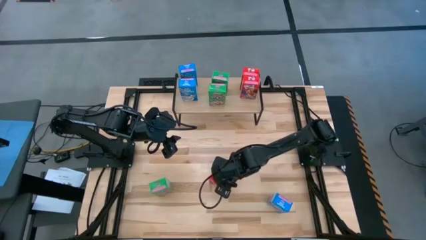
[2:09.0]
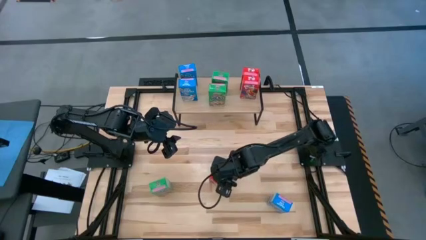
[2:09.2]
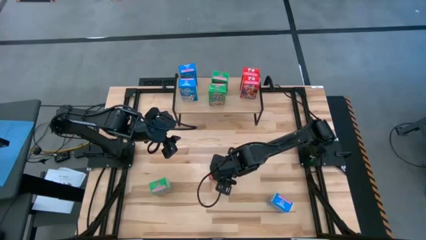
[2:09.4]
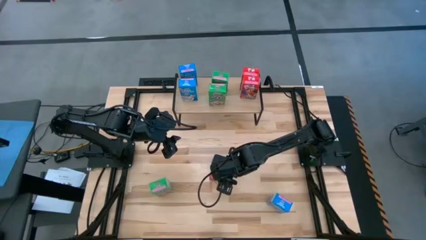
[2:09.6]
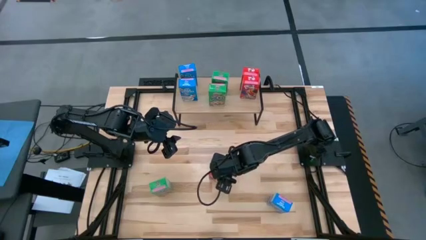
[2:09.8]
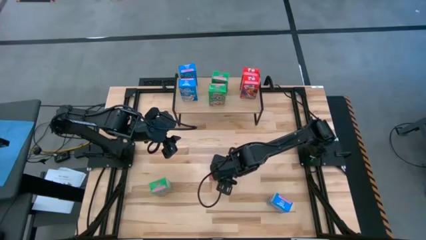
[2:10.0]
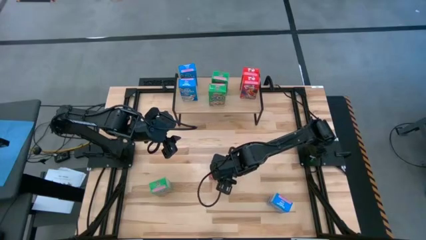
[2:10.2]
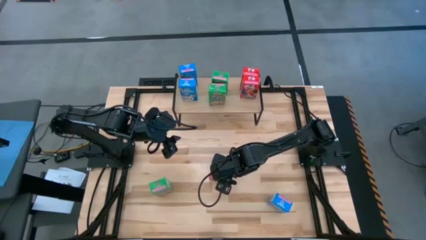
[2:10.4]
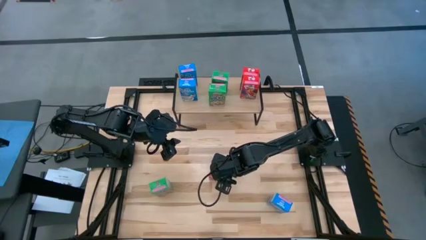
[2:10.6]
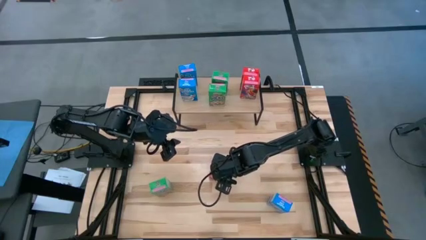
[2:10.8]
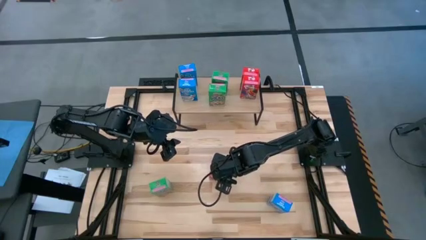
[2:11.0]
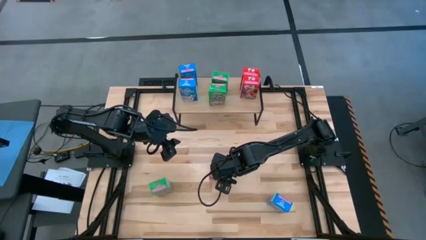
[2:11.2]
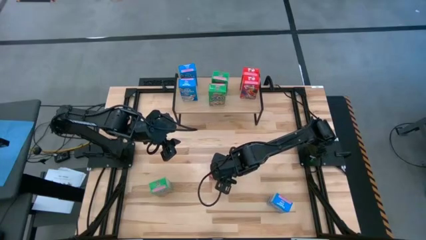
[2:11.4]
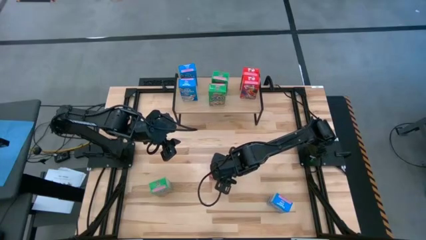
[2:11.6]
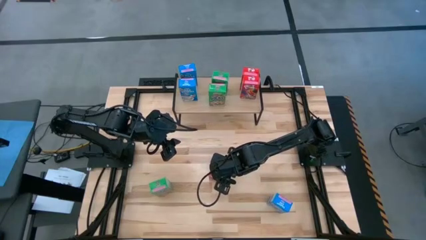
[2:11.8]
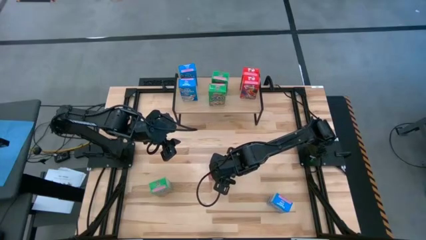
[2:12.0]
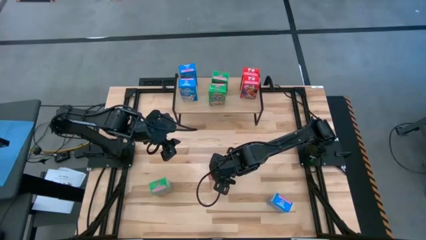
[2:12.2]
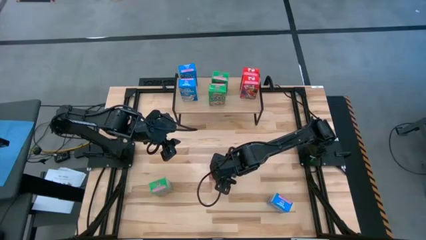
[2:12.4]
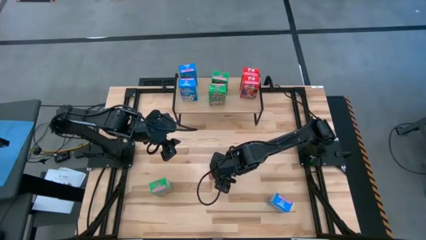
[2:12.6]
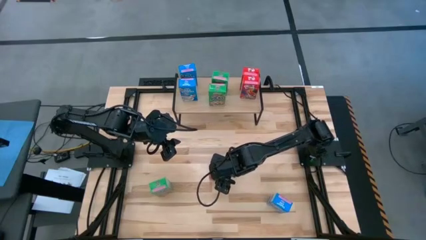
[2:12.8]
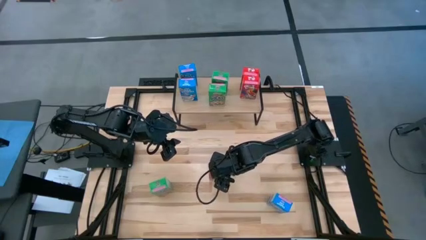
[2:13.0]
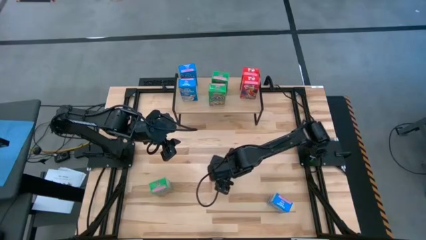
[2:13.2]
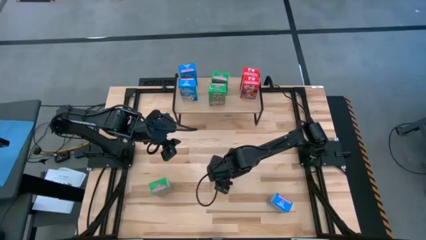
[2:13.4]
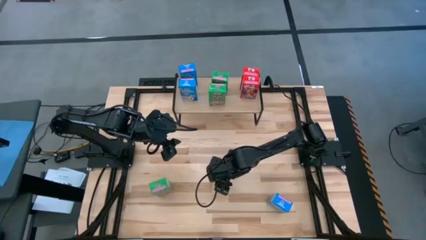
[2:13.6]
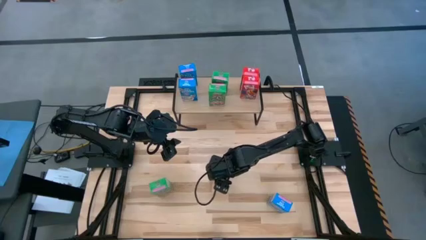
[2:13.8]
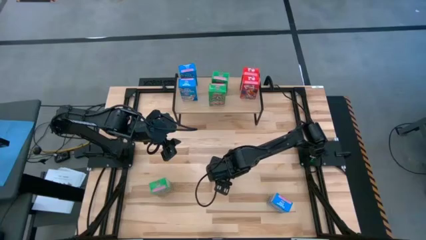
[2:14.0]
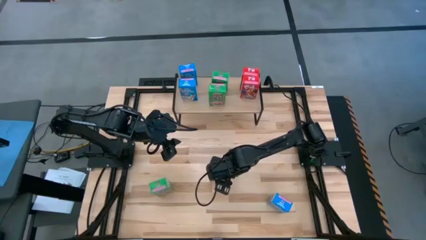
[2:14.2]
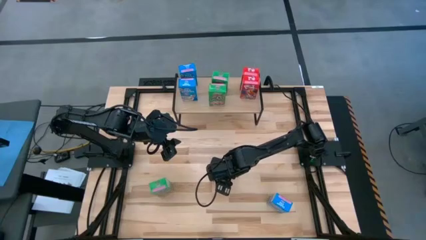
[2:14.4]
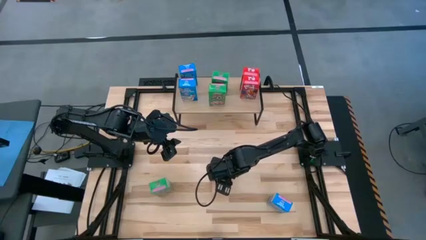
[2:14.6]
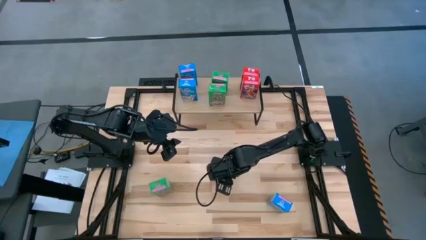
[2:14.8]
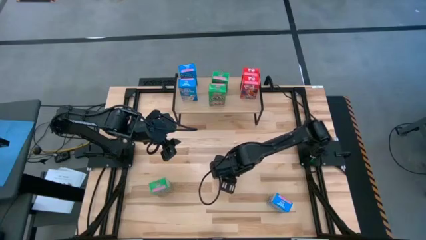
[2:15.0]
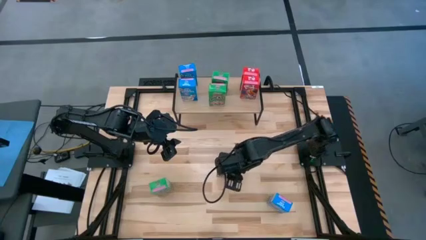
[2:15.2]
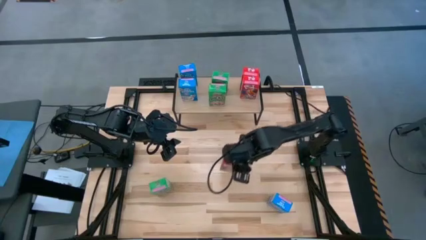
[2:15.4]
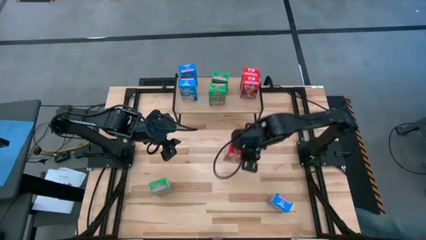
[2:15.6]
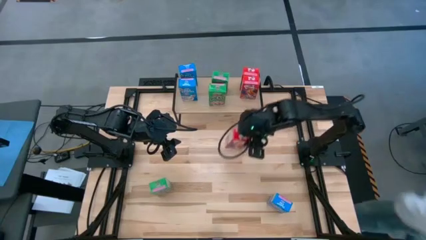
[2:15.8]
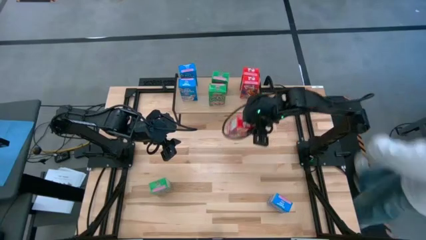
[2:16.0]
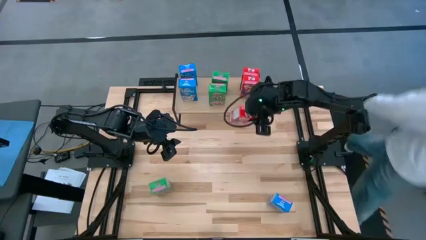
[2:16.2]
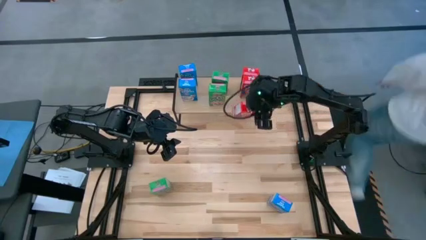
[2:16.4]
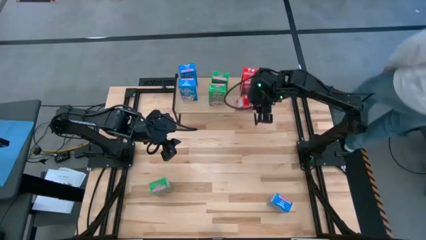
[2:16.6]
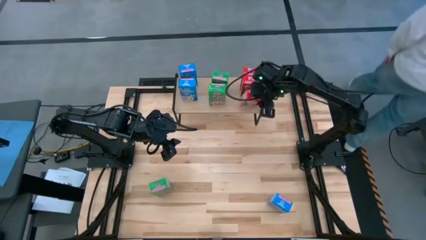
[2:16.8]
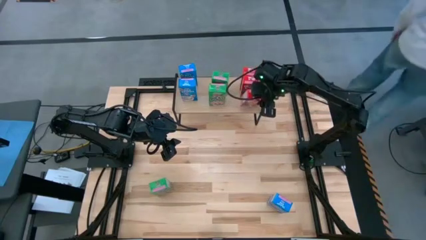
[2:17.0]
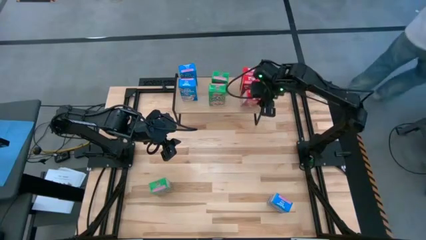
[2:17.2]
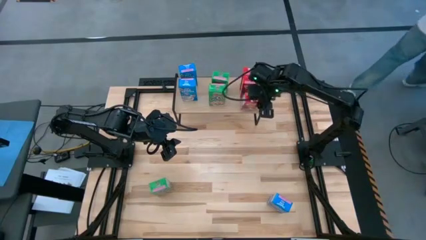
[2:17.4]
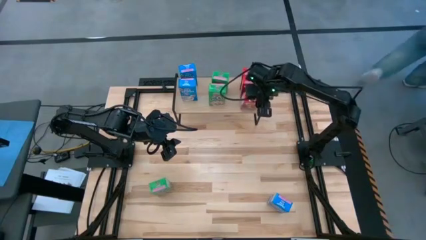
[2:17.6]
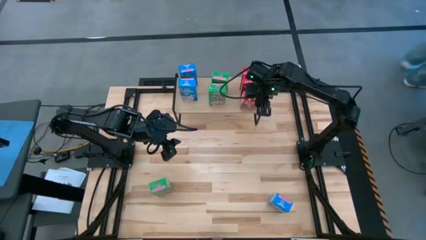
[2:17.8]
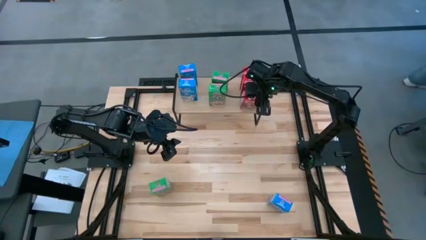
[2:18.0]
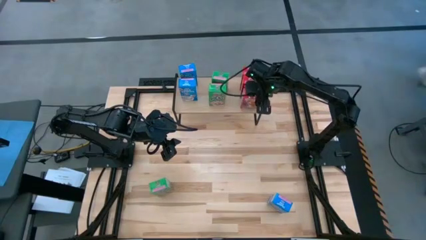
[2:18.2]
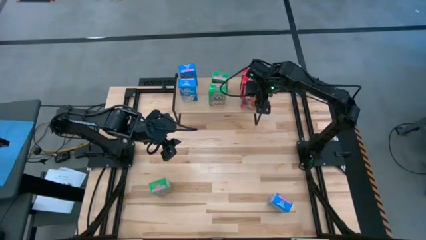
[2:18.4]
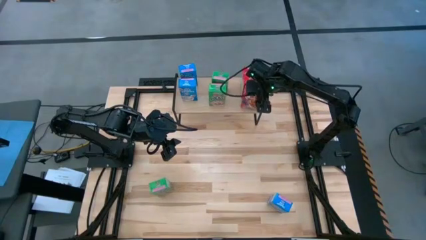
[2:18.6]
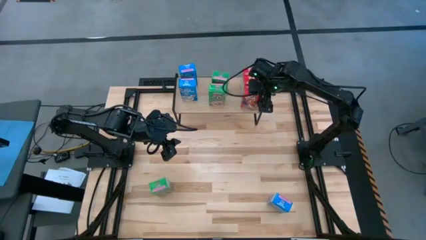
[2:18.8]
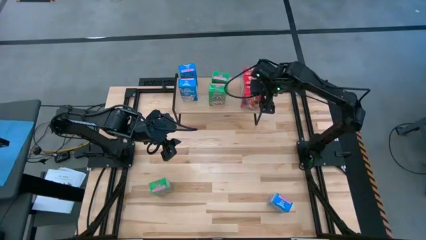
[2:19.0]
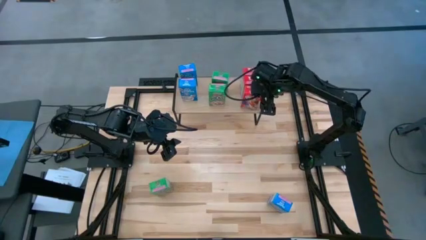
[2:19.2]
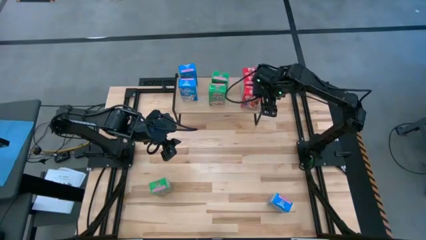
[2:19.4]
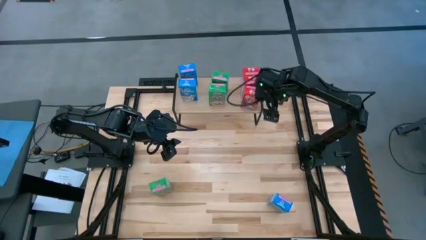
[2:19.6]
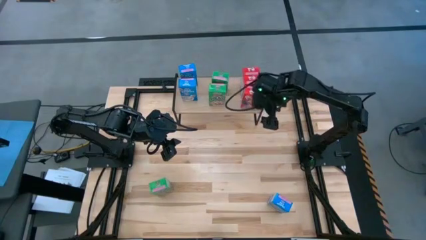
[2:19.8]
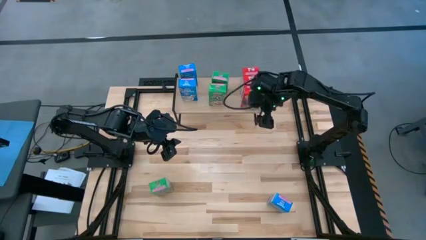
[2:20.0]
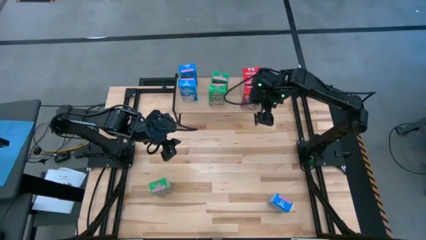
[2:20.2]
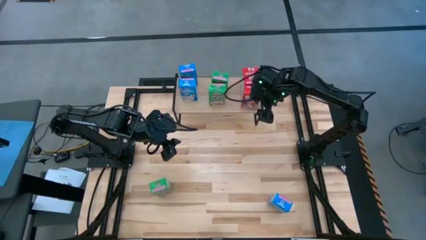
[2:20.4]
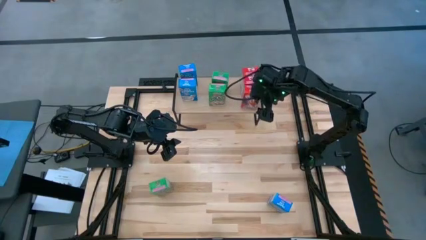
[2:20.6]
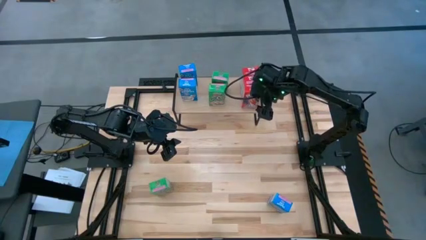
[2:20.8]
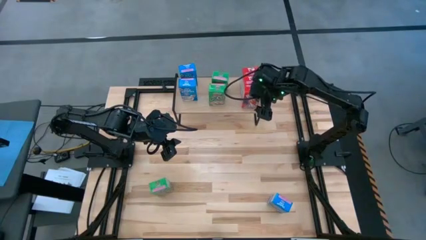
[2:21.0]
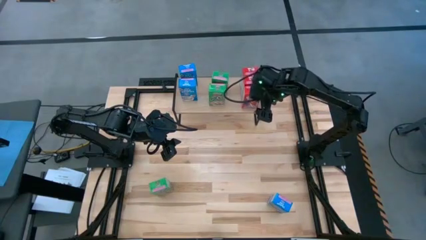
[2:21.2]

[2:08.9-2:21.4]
Task: Stack cereal on shelf
Put the red cereal box on the shelf aligned with the other red cereal boxes
